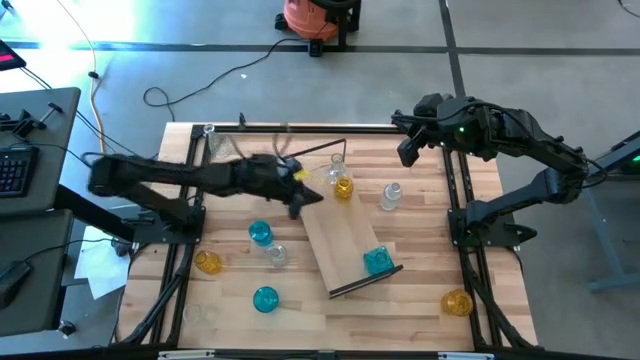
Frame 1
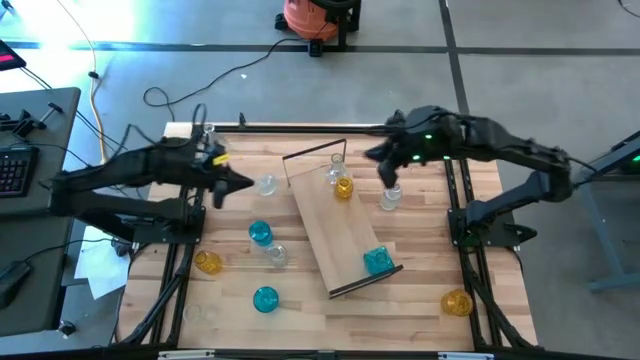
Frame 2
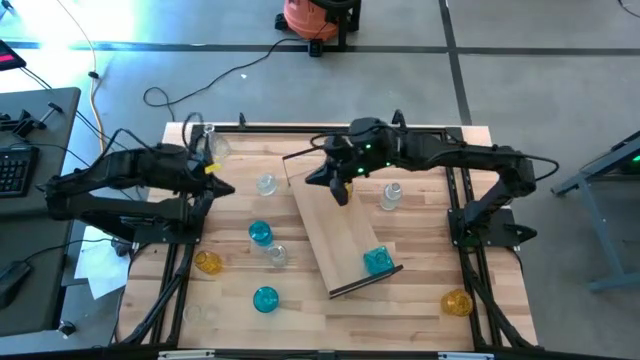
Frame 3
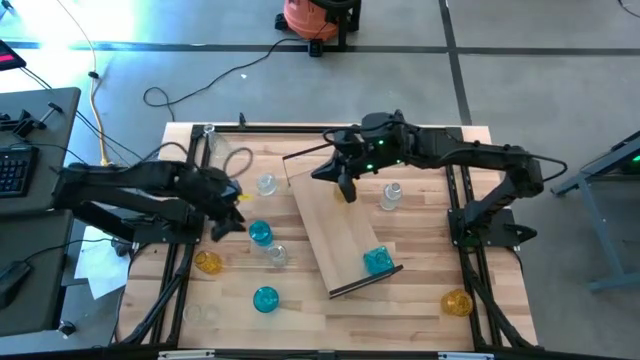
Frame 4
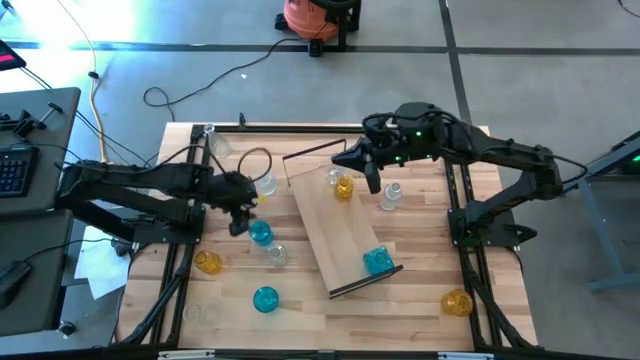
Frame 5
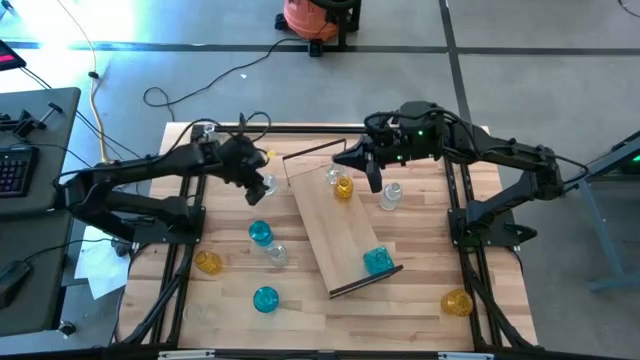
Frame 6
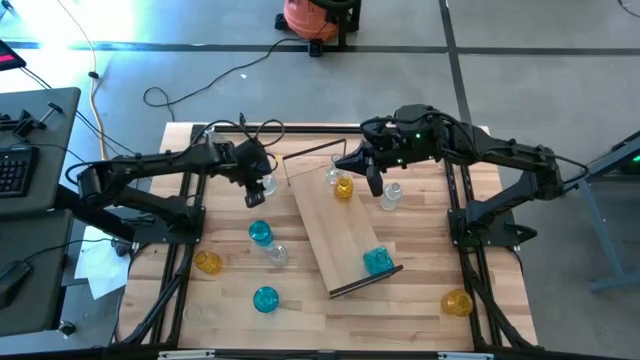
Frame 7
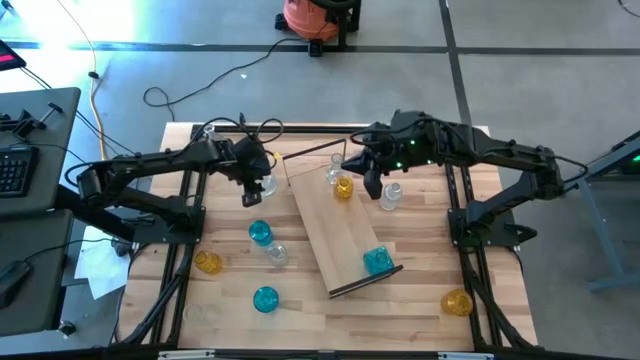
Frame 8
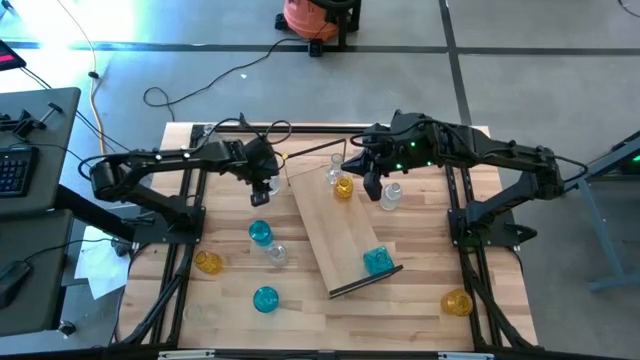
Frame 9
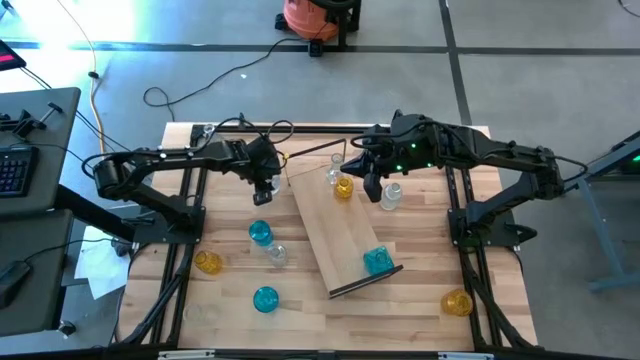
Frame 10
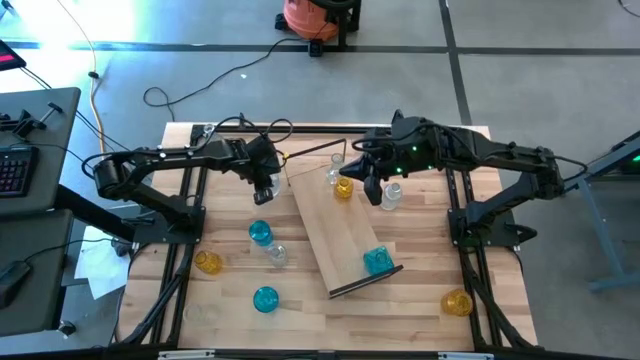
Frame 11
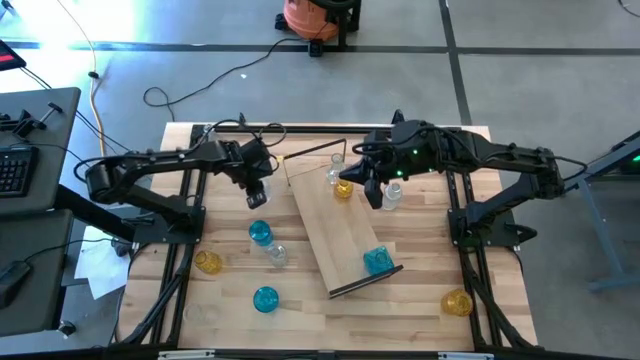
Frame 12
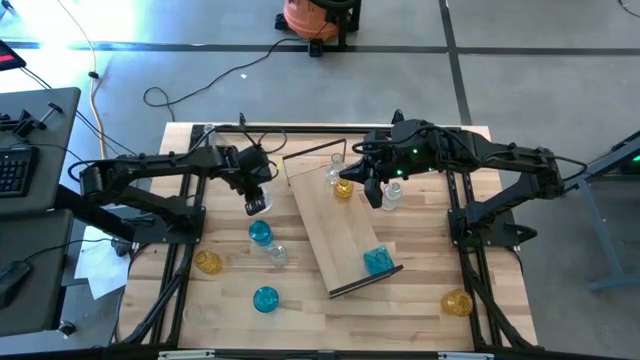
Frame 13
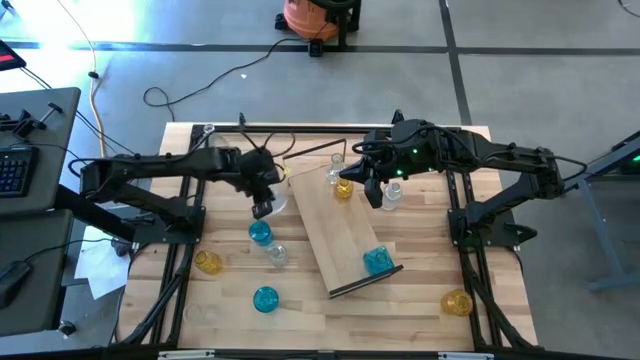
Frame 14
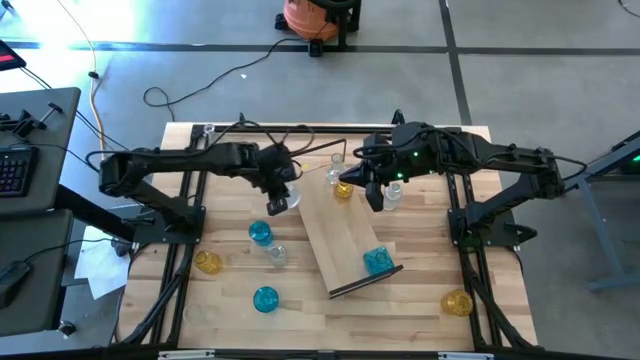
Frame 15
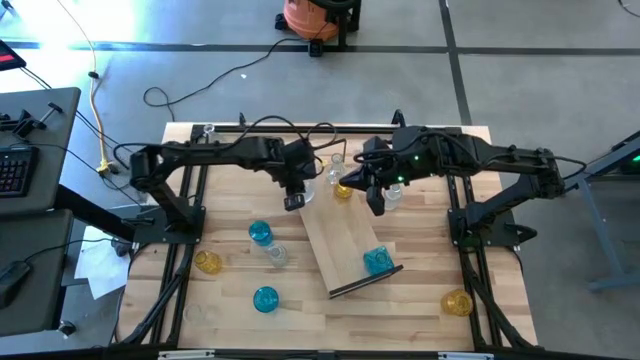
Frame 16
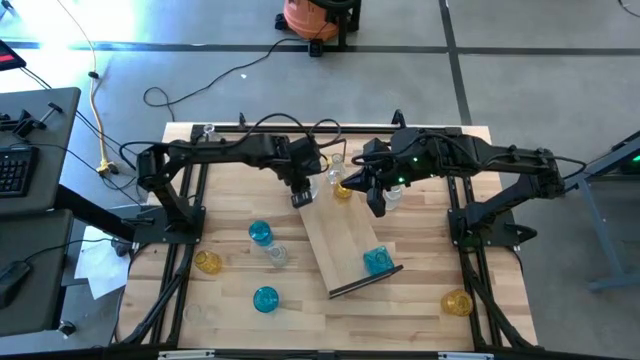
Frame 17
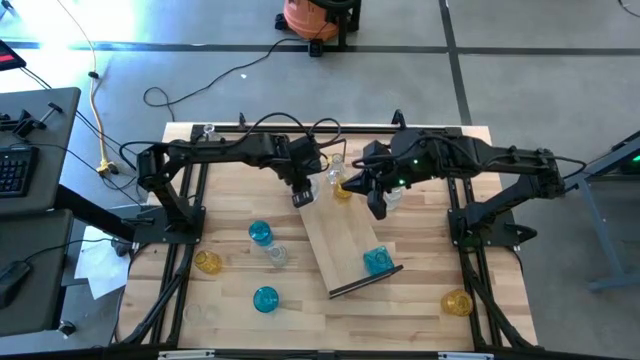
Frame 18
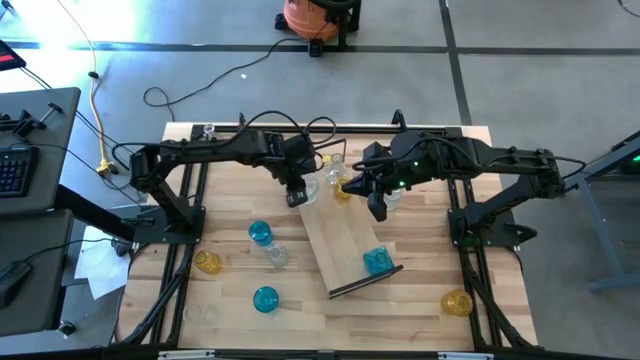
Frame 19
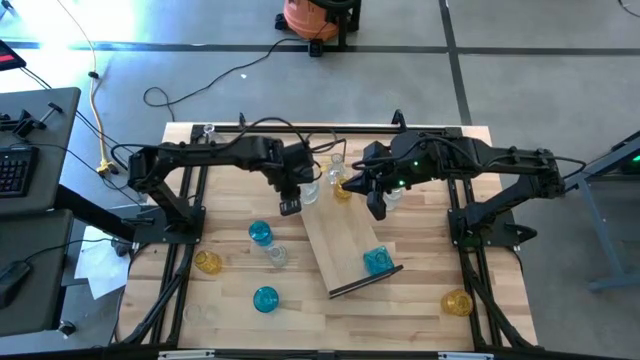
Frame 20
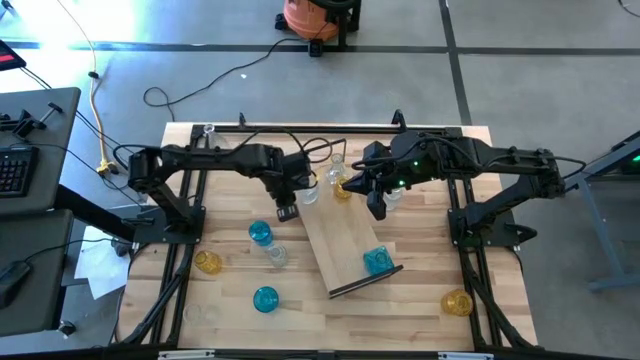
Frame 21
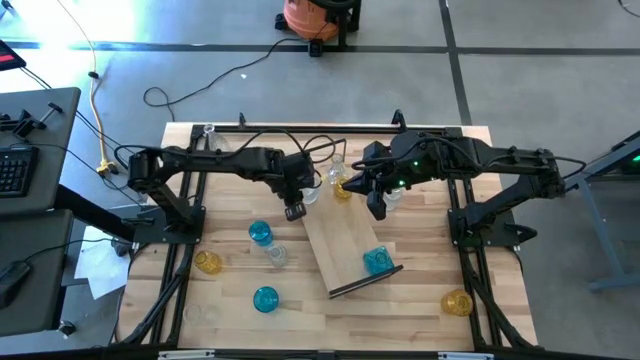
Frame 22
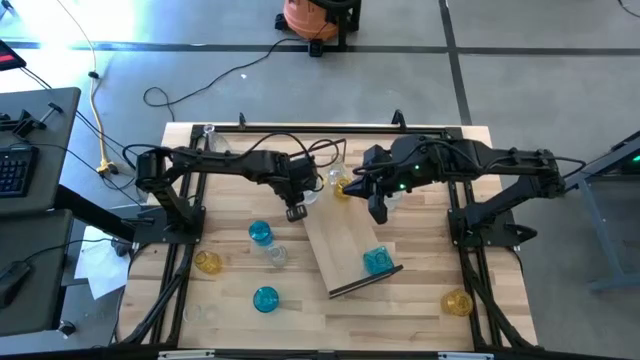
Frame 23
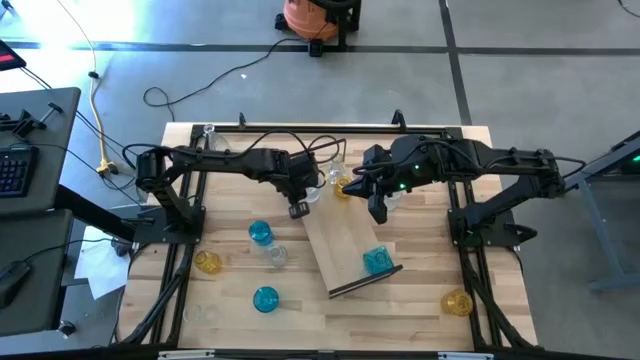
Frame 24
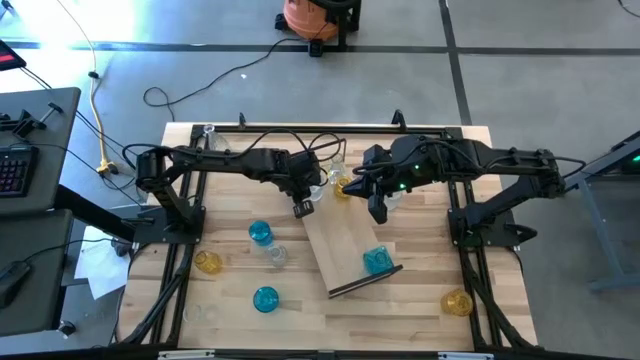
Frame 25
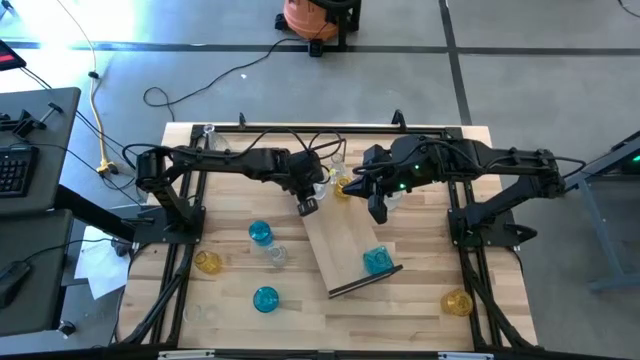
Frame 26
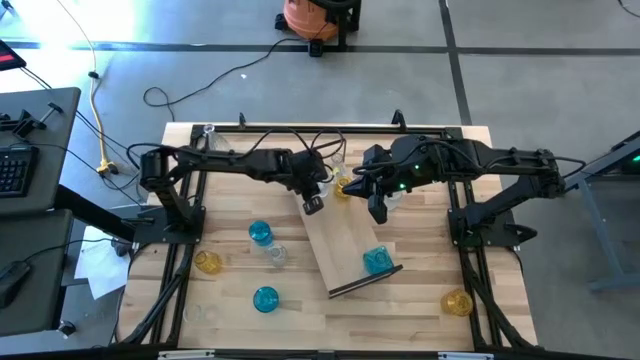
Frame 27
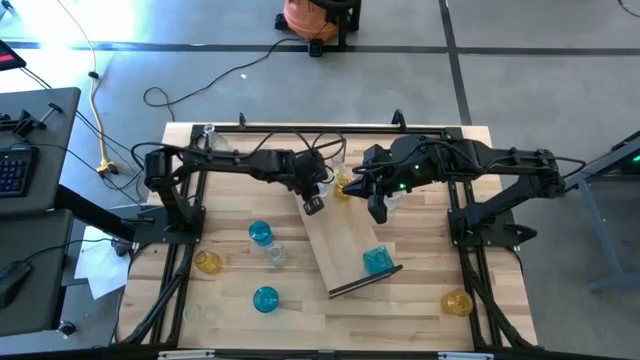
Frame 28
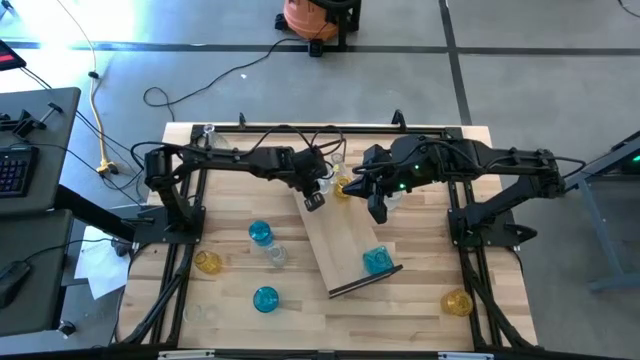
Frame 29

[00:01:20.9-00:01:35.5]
Task: sort vases onto shelf
Put the transparent crystal vase on the shelf aligned with the other transparent crystal vase

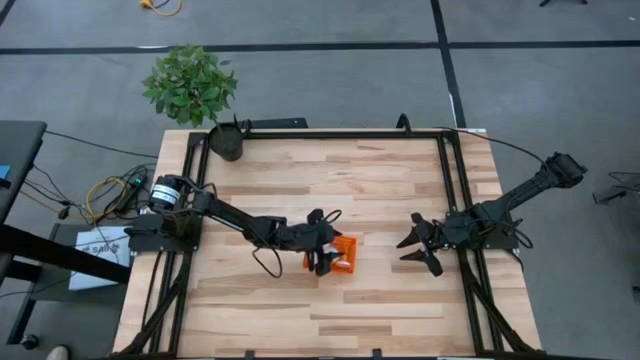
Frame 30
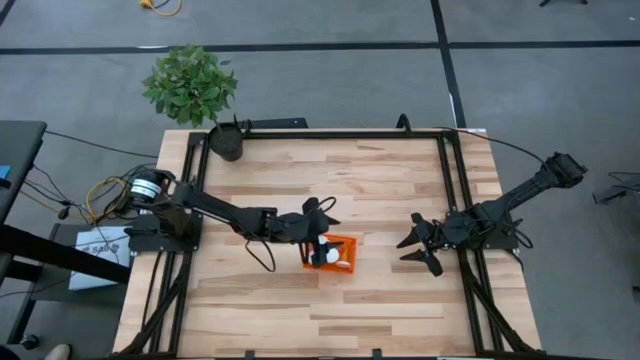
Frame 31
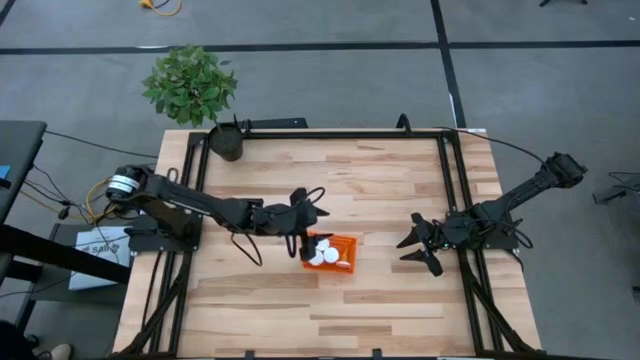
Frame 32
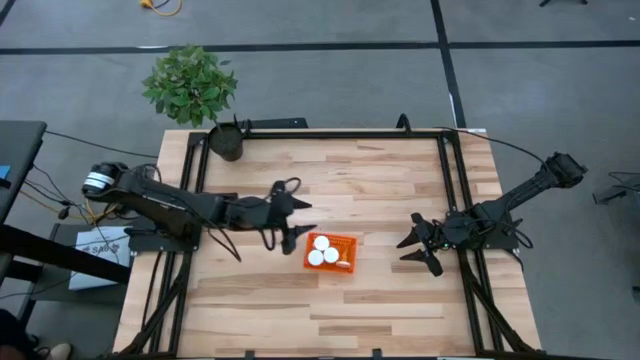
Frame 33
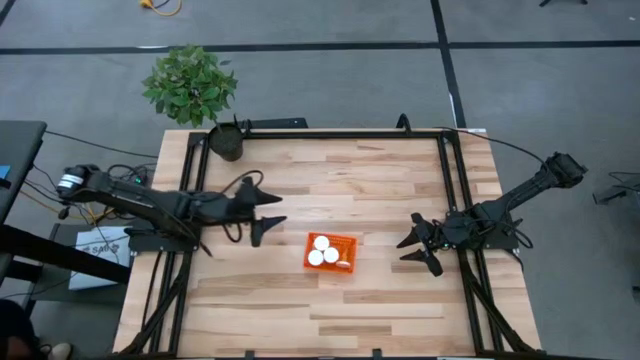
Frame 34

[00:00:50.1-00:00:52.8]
Task: Pick and place pill bottles into a basket
Return to Home Position
